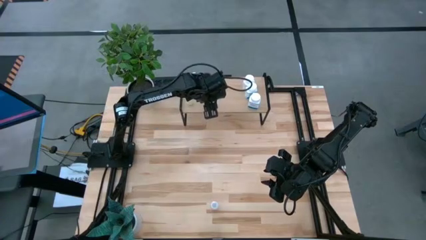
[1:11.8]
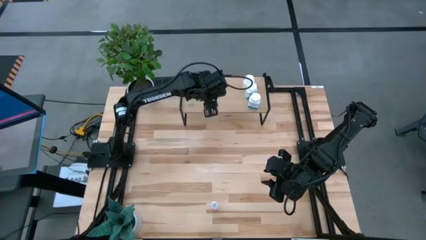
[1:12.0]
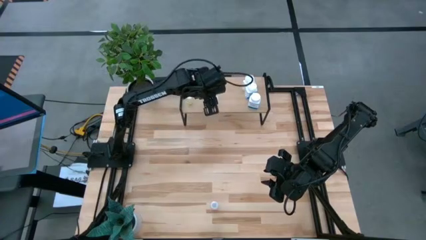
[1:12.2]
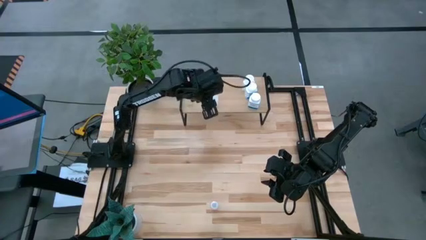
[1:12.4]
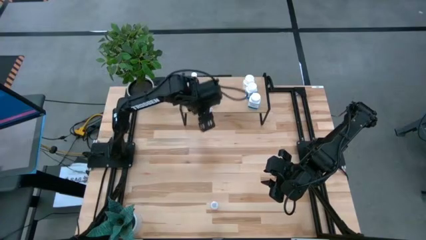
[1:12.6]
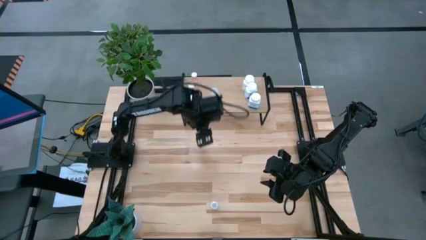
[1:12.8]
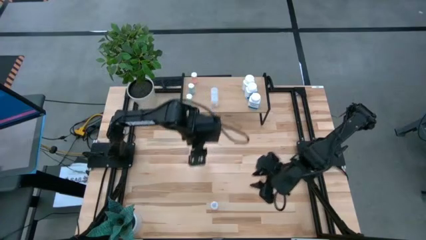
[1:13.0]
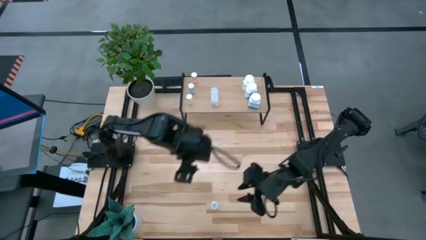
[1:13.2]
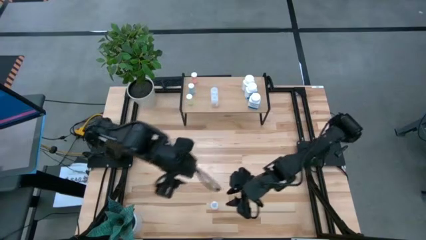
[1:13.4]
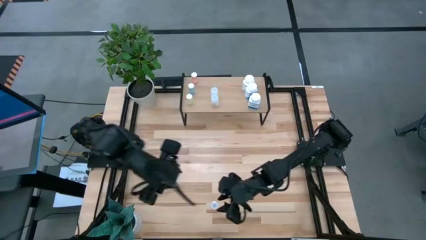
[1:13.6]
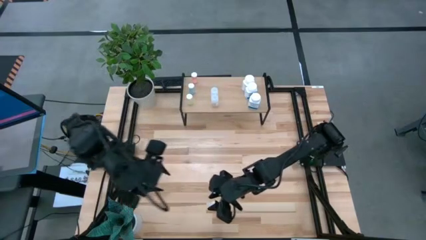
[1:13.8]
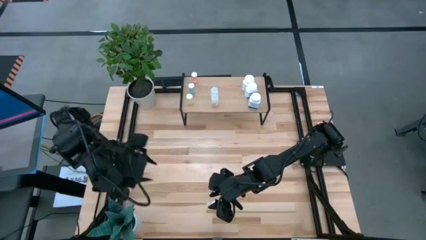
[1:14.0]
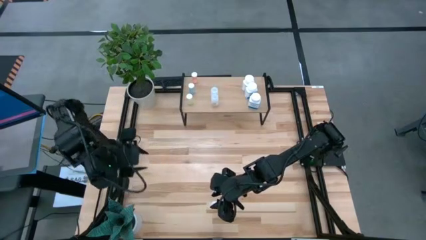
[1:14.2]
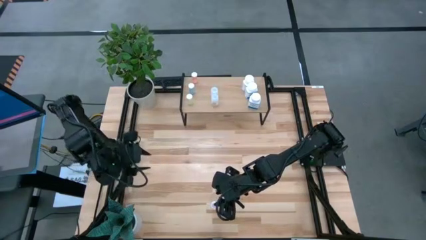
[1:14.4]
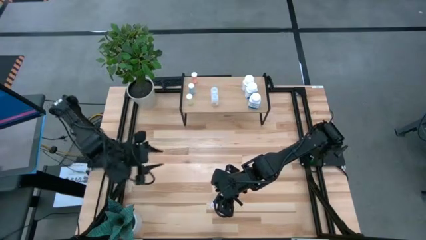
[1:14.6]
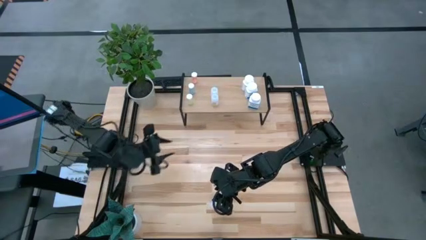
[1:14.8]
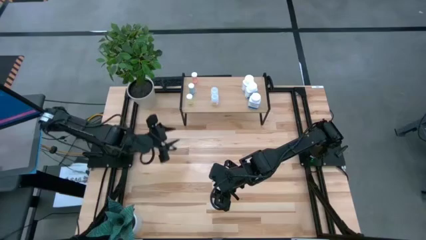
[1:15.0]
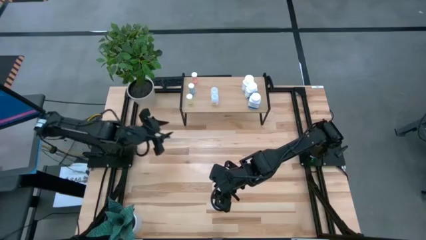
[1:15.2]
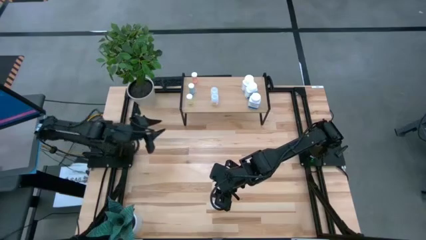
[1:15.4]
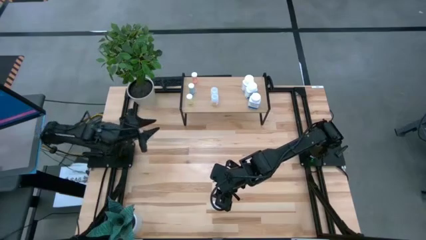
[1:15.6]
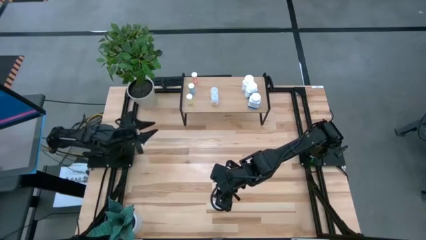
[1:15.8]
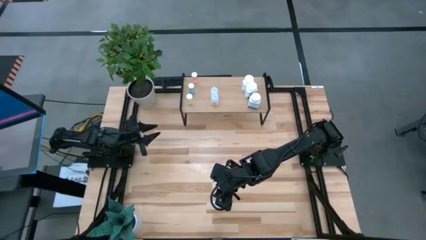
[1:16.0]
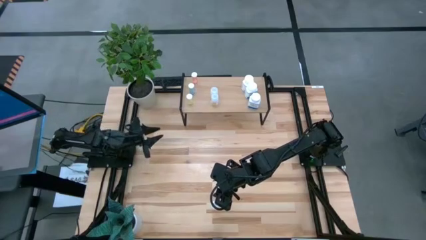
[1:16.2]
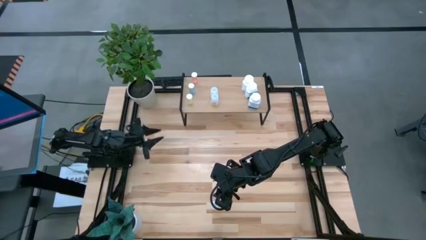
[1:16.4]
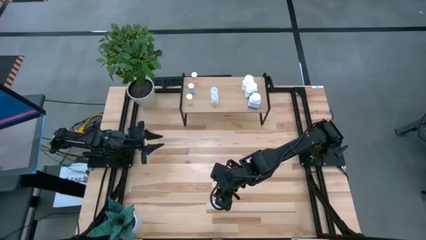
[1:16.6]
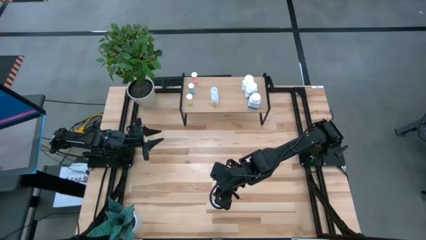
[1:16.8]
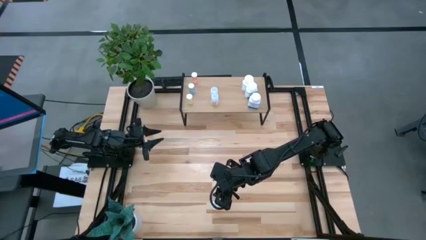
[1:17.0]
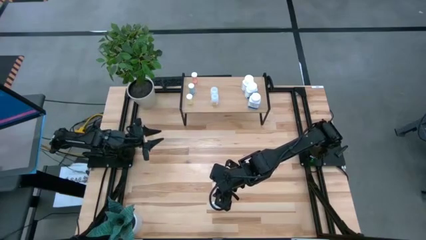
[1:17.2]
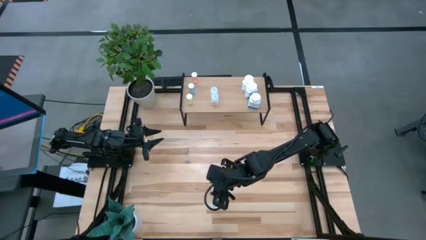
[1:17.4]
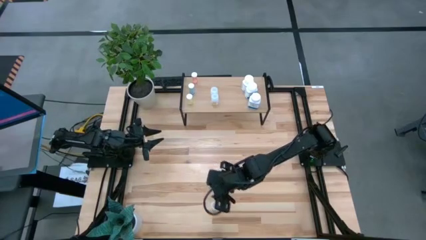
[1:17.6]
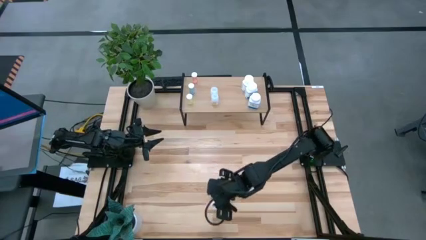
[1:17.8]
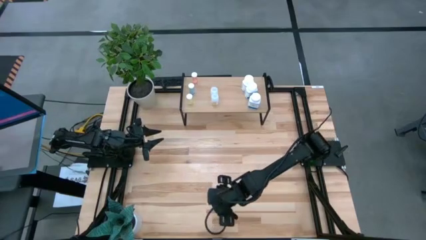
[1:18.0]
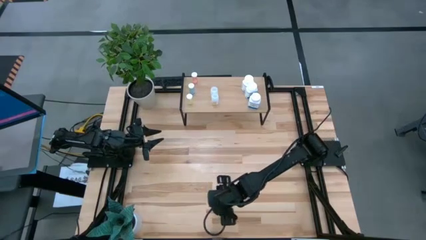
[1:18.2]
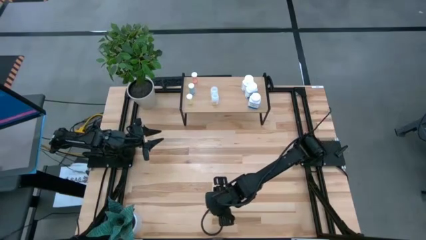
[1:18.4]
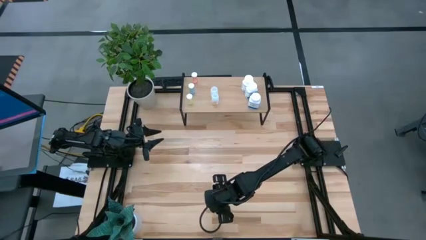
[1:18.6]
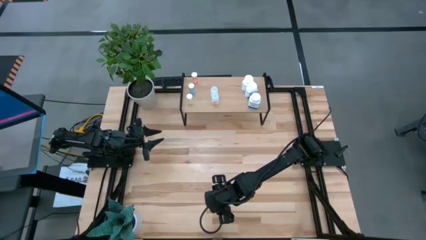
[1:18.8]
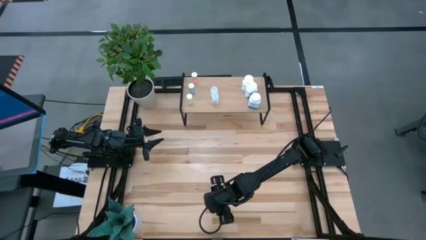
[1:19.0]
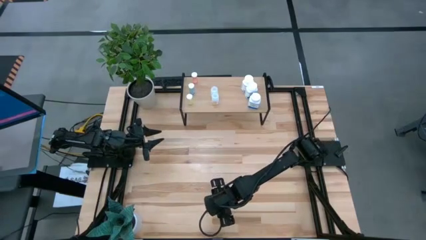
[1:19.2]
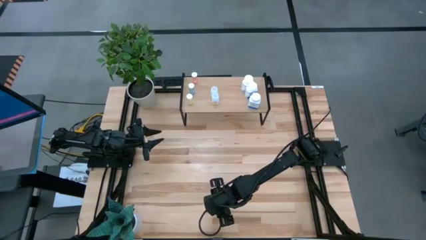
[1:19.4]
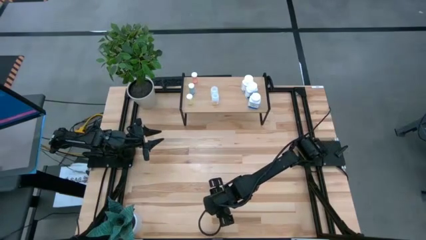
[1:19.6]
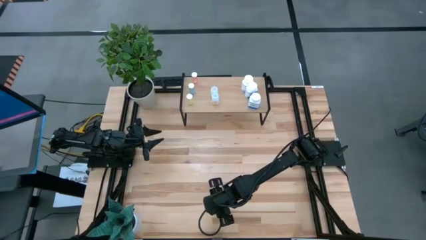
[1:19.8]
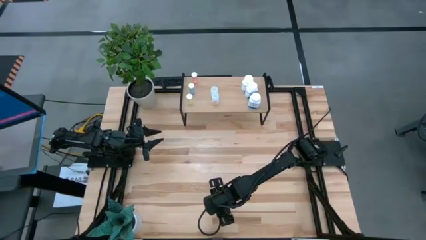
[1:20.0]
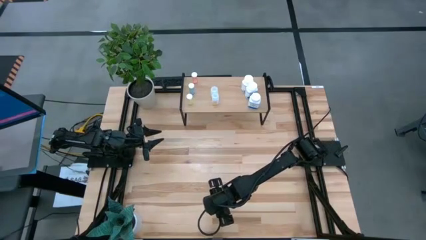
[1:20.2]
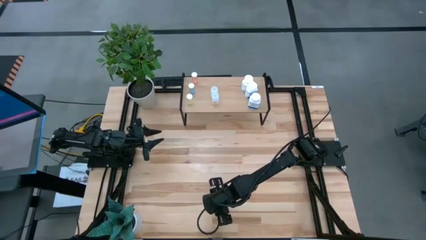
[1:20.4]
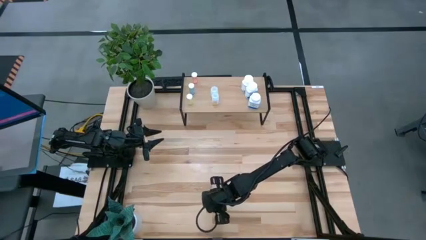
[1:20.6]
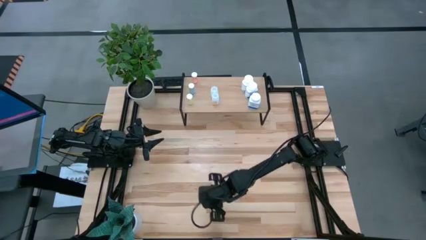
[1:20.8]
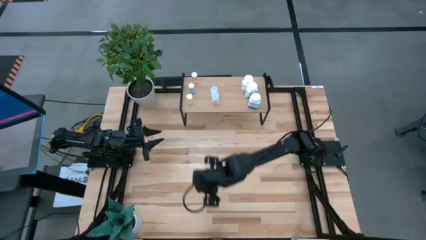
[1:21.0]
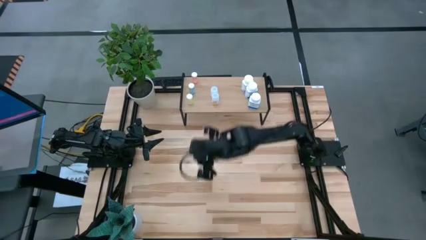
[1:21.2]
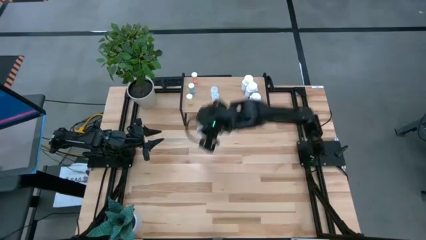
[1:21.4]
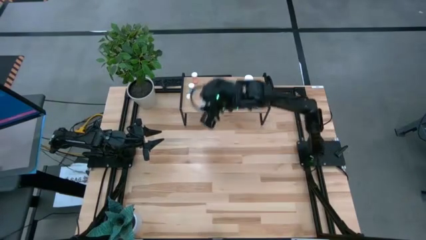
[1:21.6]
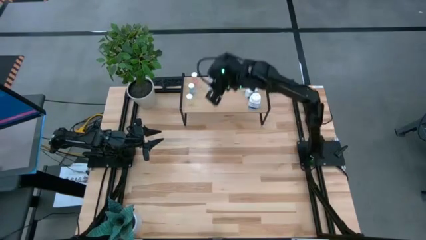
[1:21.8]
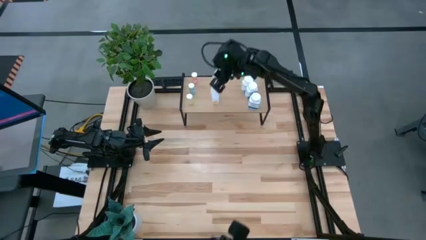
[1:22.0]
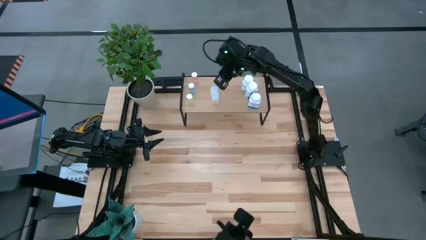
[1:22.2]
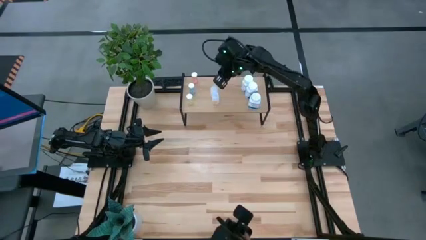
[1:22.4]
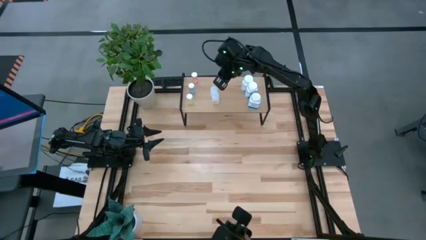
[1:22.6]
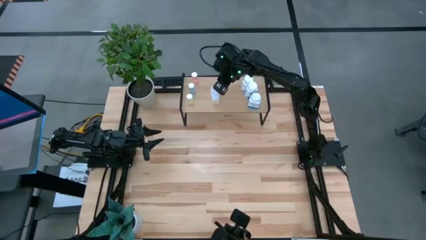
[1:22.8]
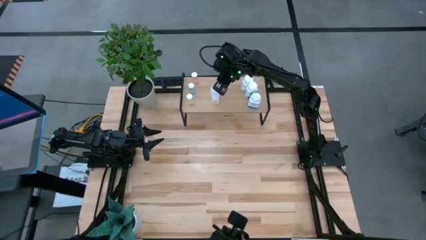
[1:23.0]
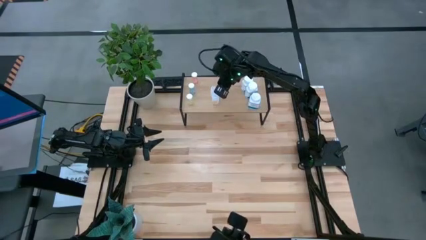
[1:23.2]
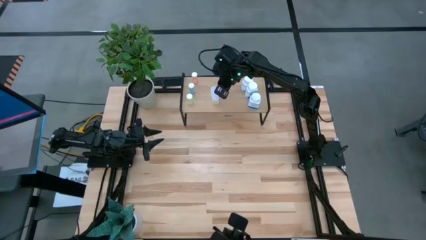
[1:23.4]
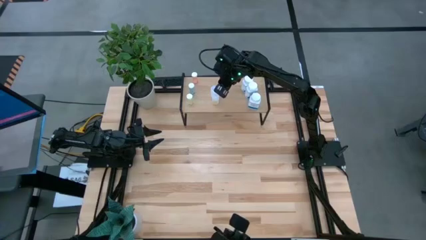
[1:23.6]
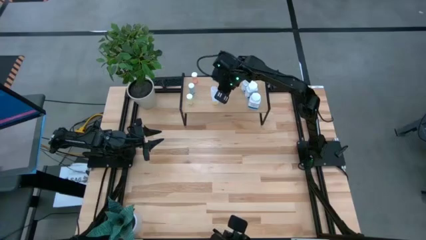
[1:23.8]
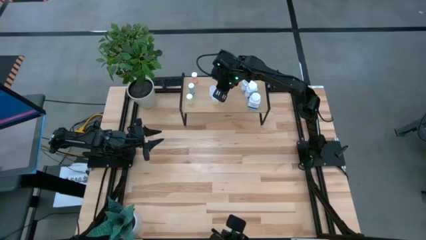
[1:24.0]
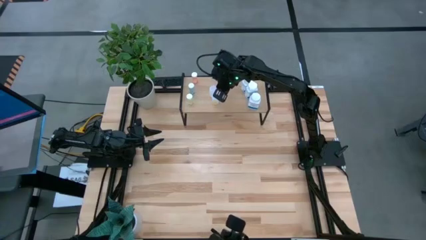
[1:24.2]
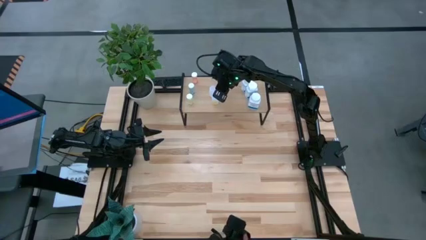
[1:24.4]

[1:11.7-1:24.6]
Task: Pick and place medicine bottles onto shelf by color
Put the transparent pill bottle on the shelf

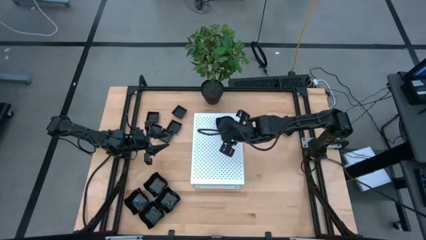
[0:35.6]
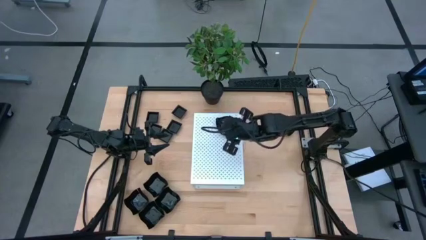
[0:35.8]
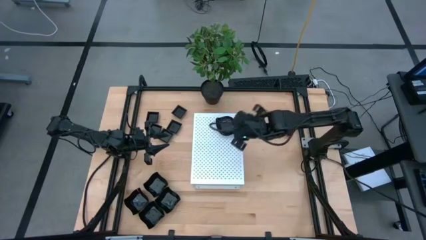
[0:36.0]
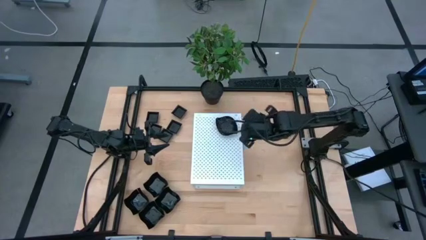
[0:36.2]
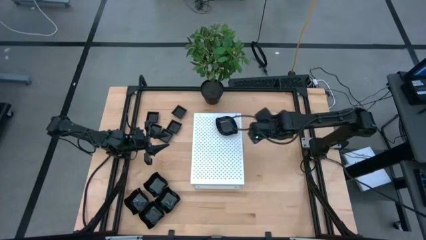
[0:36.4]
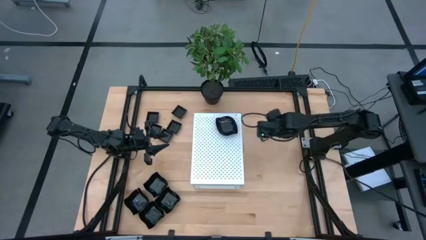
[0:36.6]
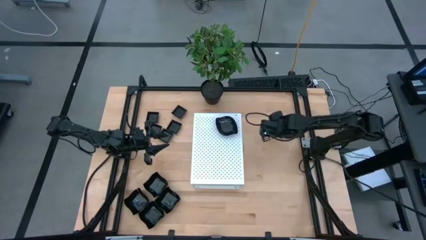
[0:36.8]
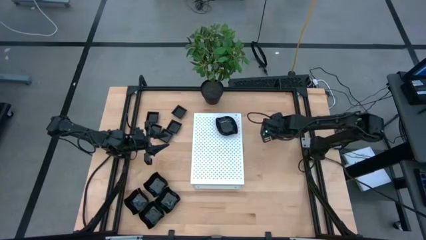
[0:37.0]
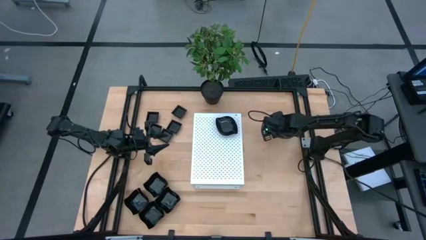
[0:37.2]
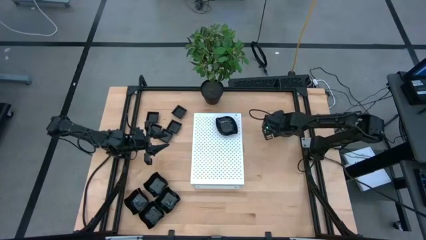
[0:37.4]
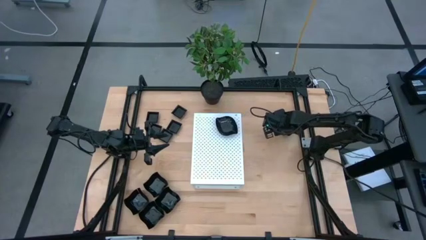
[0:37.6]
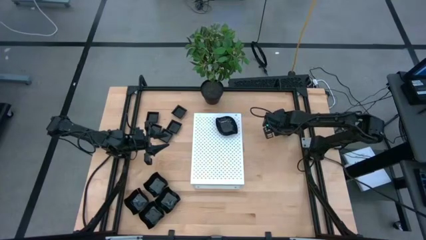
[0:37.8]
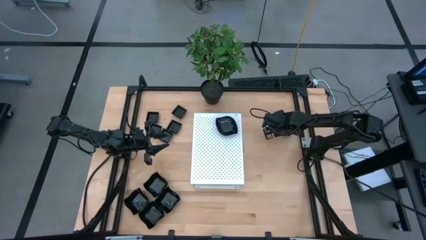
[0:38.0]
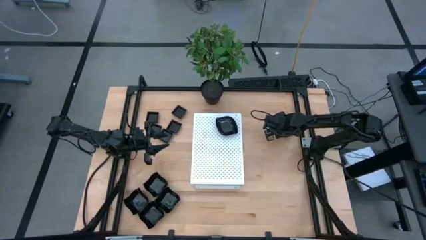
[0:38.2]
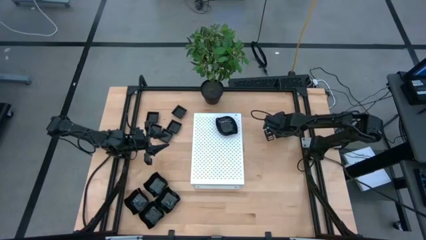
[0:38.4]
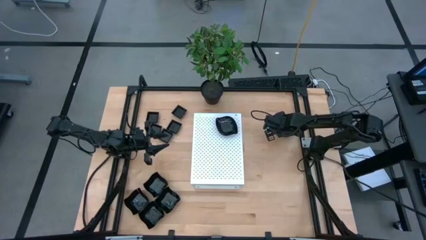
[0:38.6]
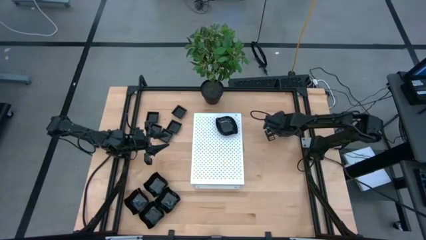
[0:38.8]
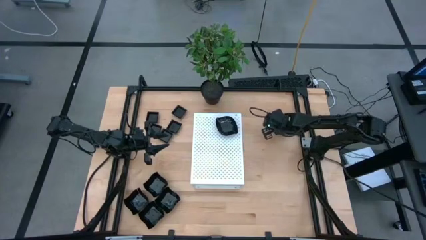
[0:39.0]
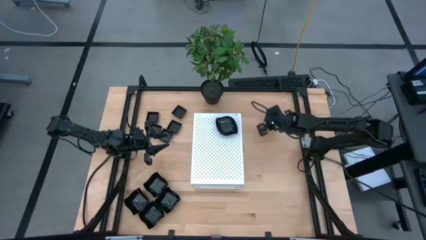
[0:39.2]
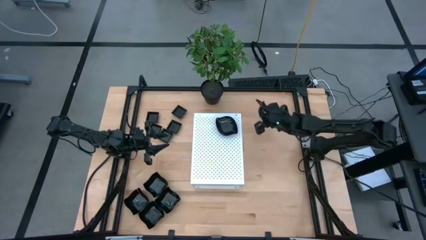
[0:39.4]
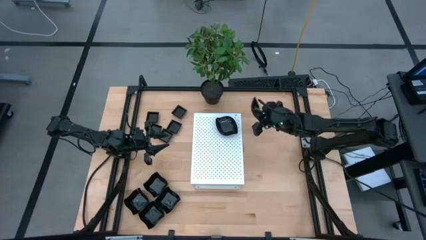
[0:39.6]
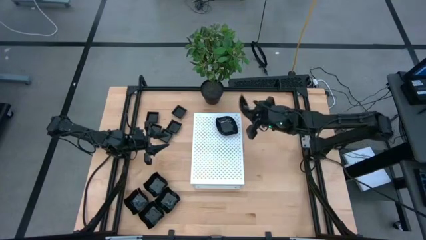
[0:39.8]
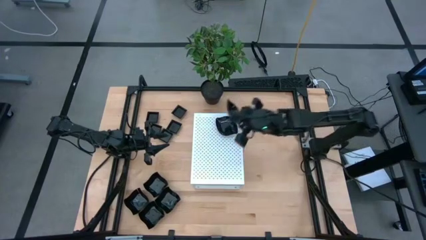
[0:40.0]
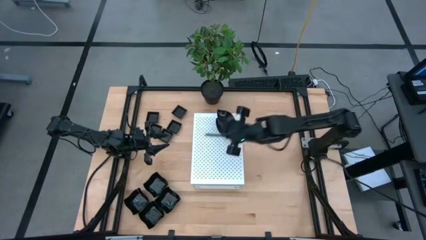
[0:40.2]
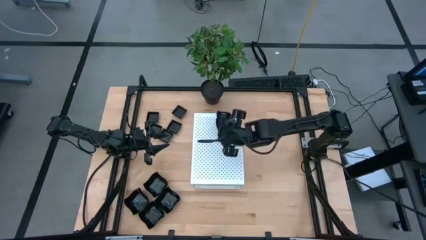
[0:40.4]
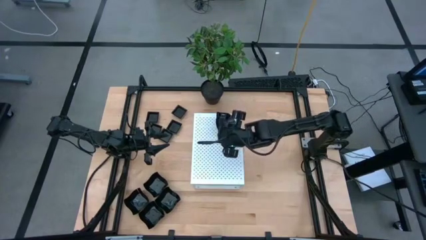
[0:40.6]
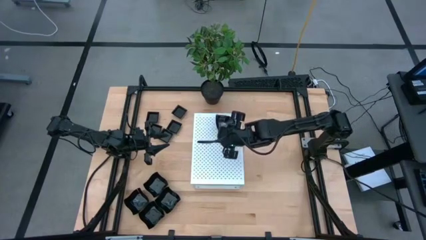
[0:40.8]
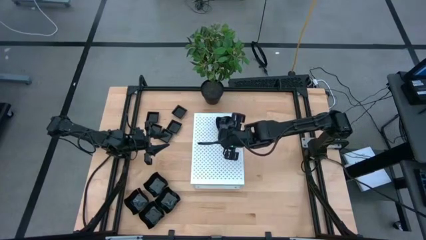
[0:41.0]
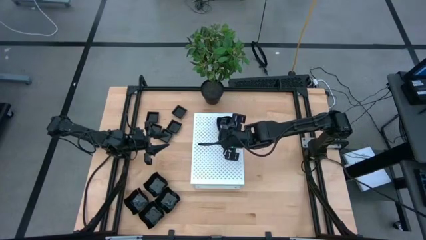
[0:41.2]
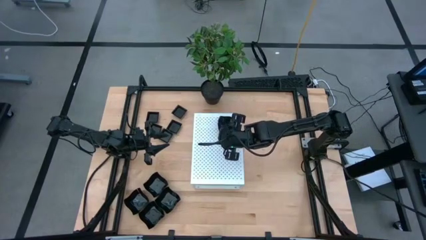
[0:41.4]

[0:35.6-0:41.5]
Task: Pick & Place Mini shaped plates
Stack the black leaf shaped plate on top of the black leaf shaped plate on the shelf
